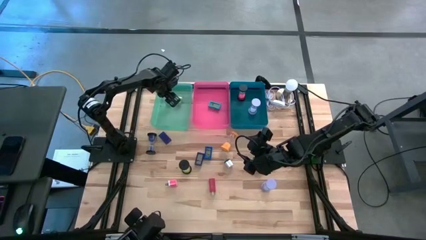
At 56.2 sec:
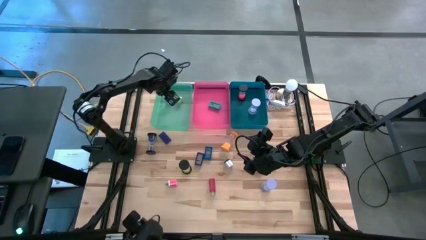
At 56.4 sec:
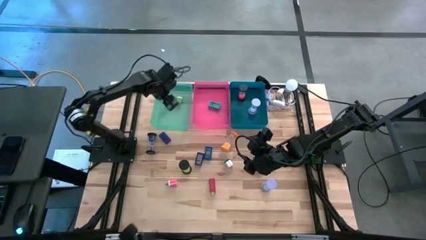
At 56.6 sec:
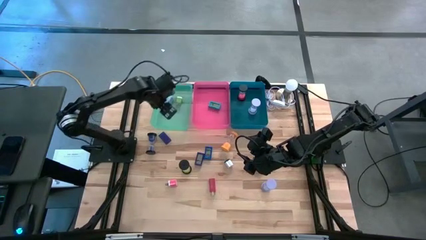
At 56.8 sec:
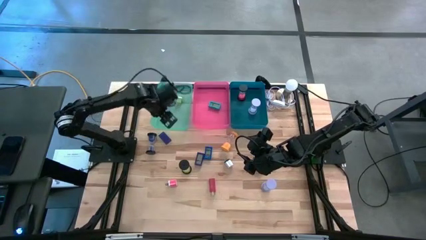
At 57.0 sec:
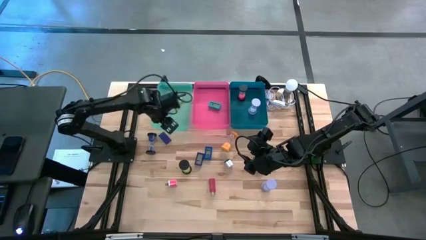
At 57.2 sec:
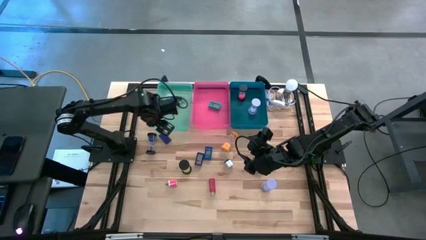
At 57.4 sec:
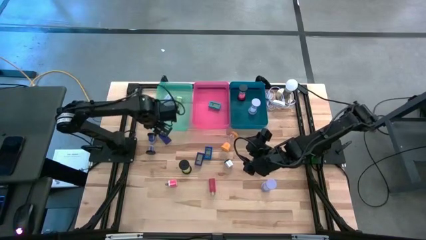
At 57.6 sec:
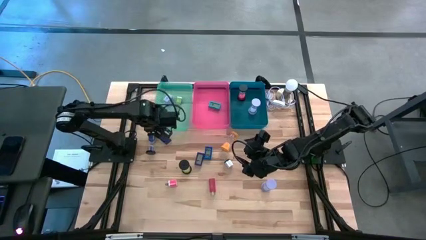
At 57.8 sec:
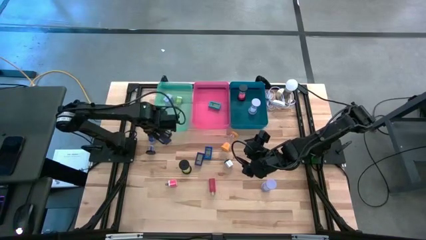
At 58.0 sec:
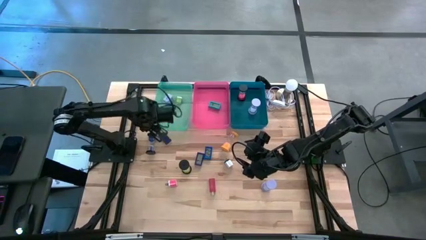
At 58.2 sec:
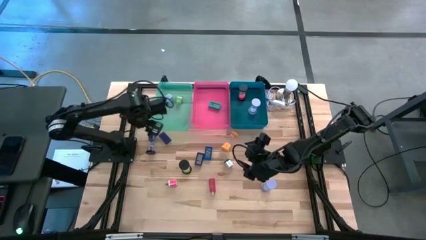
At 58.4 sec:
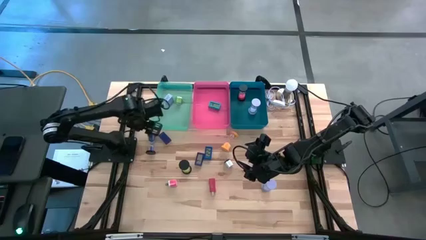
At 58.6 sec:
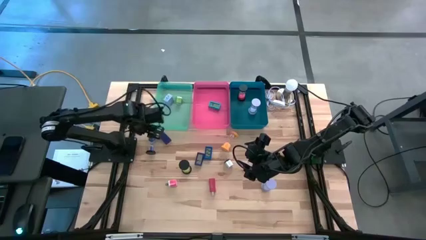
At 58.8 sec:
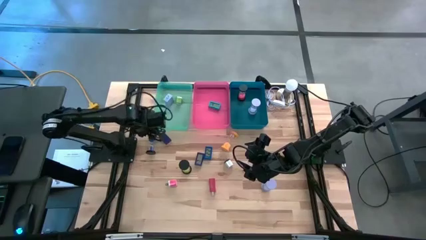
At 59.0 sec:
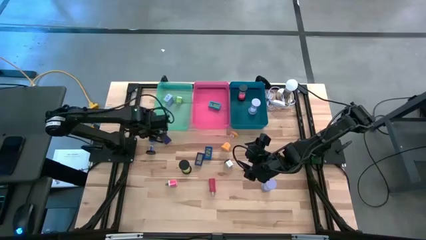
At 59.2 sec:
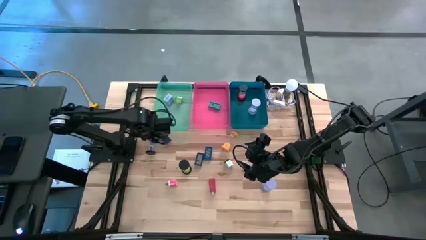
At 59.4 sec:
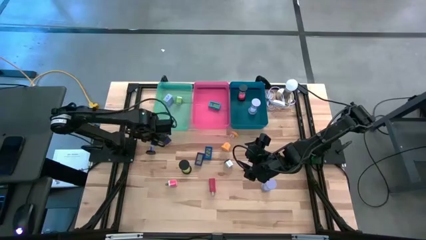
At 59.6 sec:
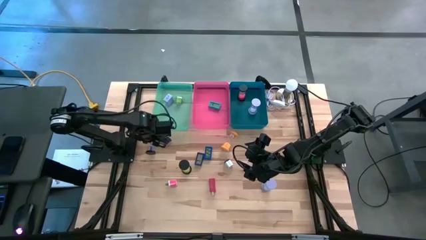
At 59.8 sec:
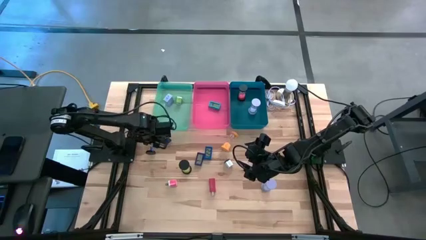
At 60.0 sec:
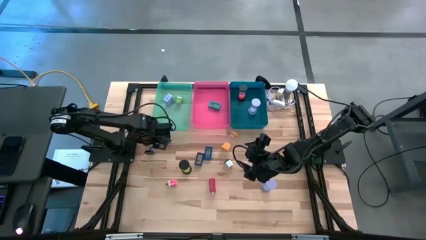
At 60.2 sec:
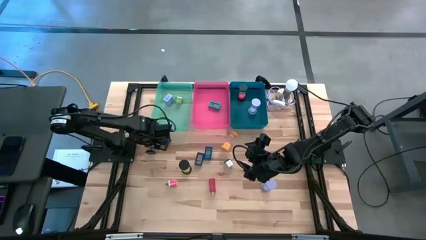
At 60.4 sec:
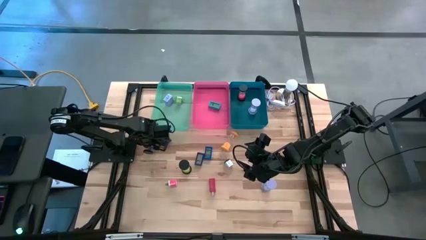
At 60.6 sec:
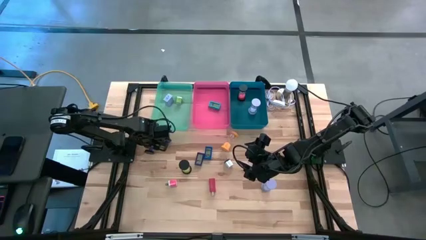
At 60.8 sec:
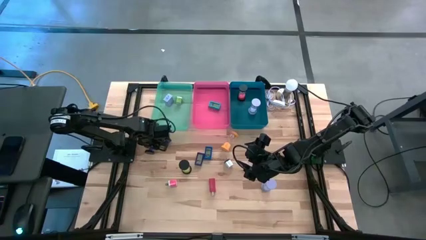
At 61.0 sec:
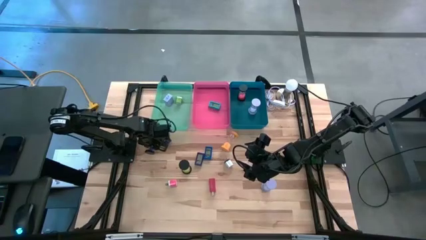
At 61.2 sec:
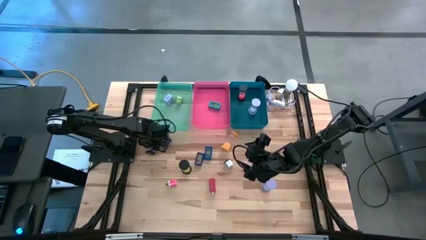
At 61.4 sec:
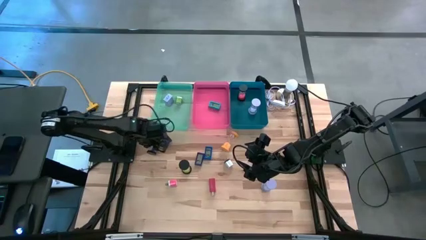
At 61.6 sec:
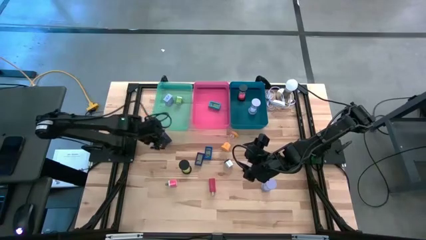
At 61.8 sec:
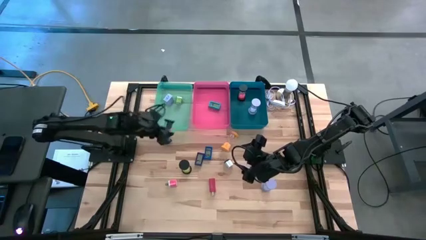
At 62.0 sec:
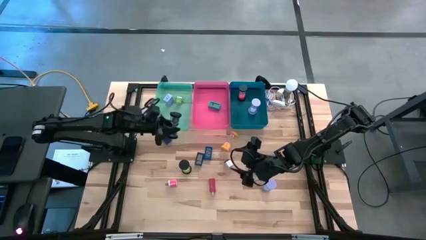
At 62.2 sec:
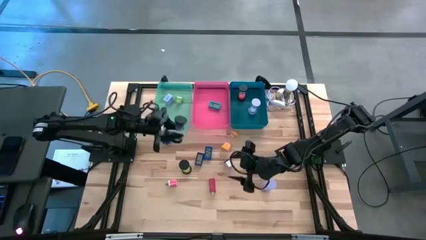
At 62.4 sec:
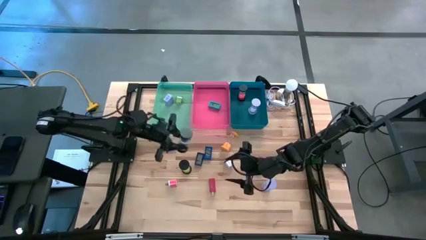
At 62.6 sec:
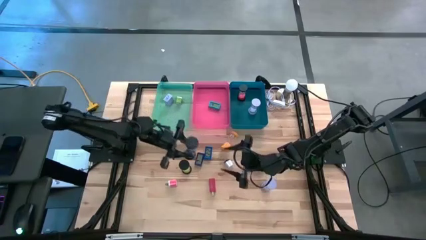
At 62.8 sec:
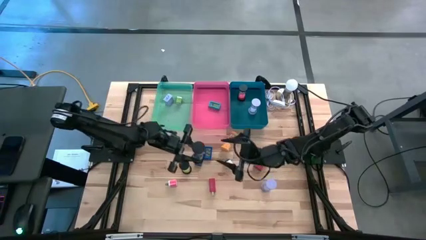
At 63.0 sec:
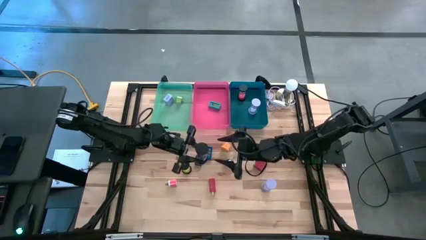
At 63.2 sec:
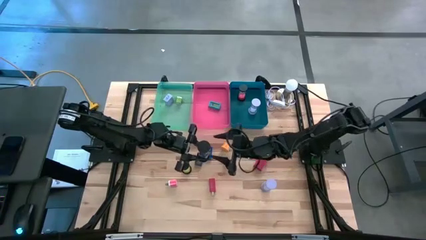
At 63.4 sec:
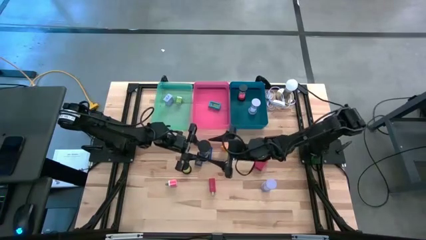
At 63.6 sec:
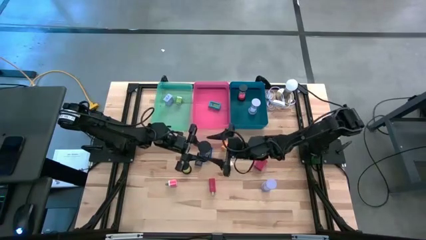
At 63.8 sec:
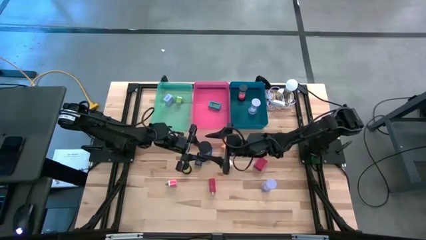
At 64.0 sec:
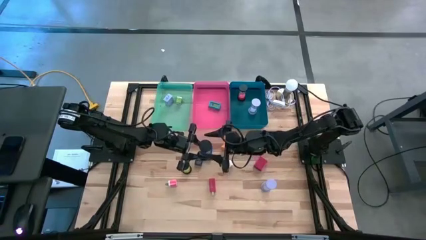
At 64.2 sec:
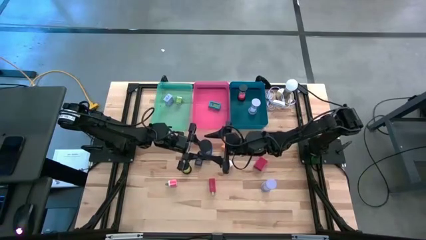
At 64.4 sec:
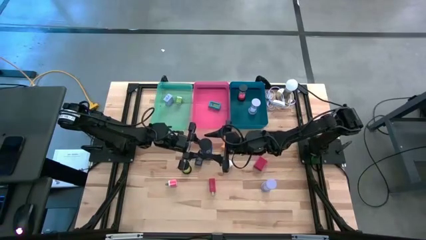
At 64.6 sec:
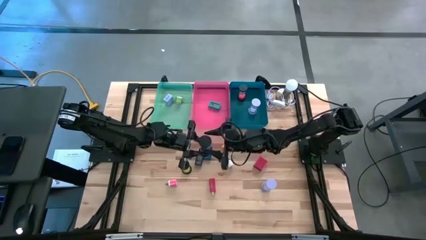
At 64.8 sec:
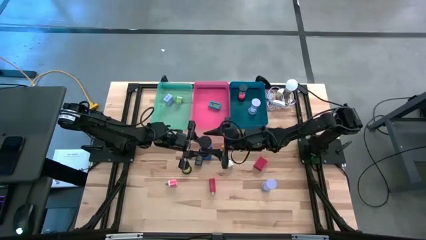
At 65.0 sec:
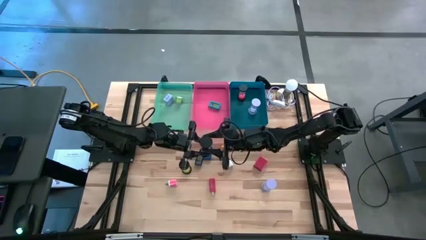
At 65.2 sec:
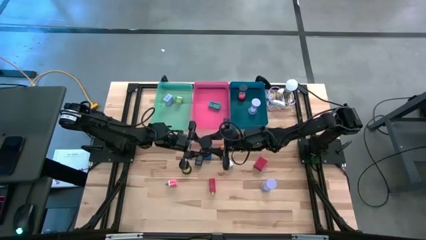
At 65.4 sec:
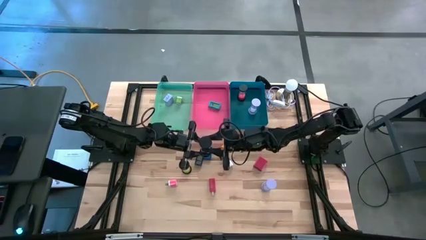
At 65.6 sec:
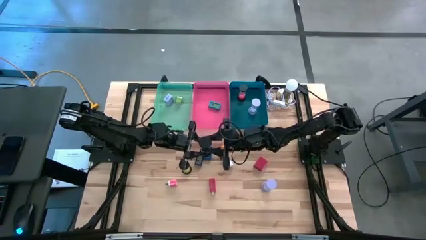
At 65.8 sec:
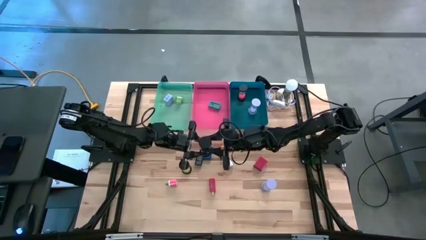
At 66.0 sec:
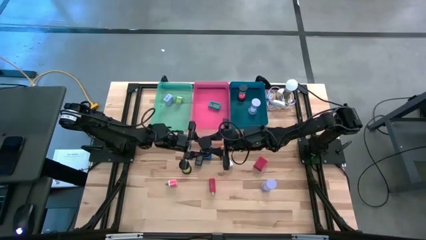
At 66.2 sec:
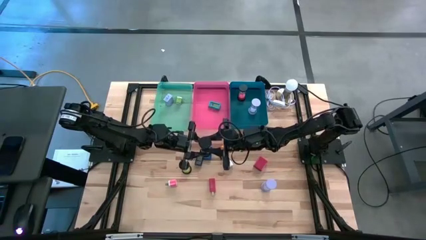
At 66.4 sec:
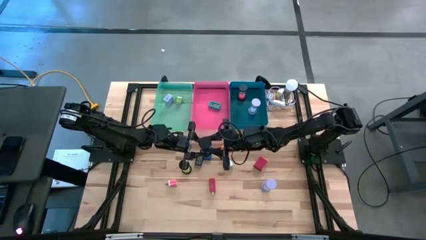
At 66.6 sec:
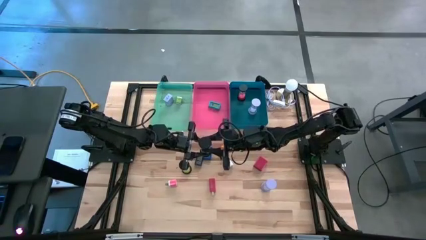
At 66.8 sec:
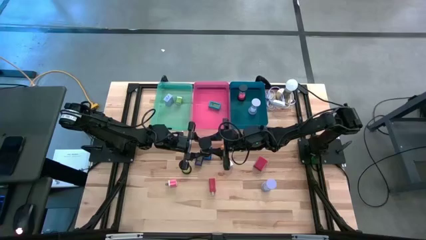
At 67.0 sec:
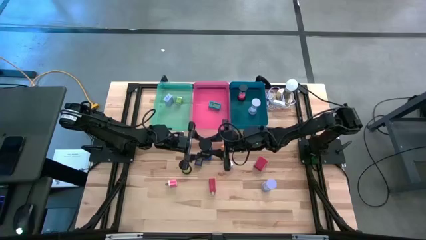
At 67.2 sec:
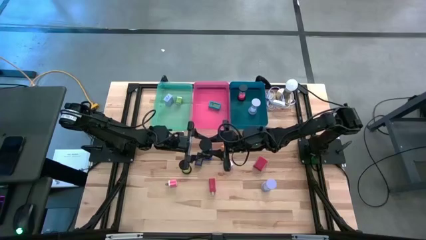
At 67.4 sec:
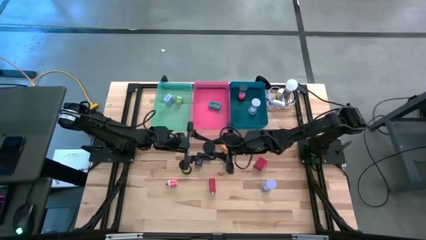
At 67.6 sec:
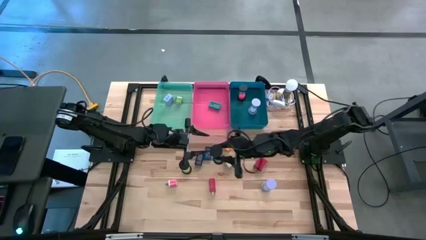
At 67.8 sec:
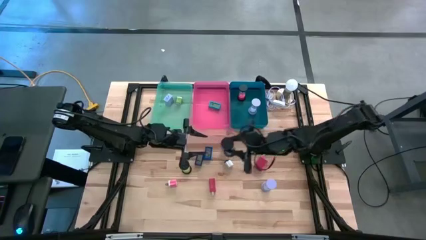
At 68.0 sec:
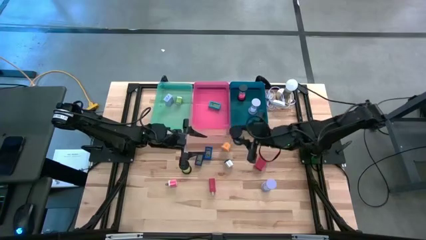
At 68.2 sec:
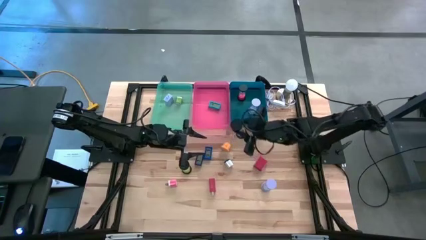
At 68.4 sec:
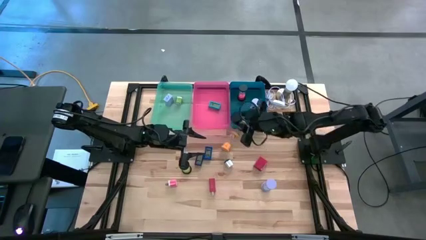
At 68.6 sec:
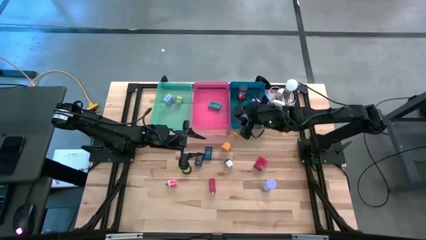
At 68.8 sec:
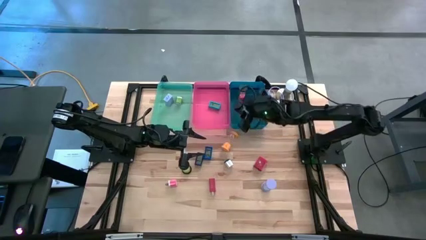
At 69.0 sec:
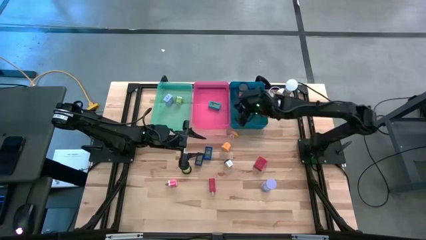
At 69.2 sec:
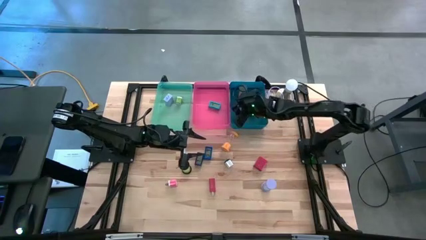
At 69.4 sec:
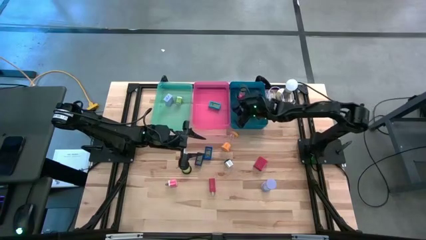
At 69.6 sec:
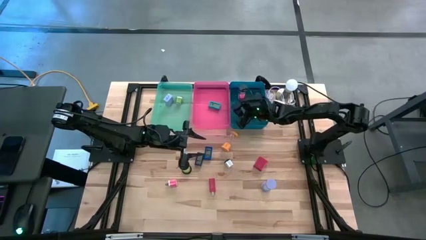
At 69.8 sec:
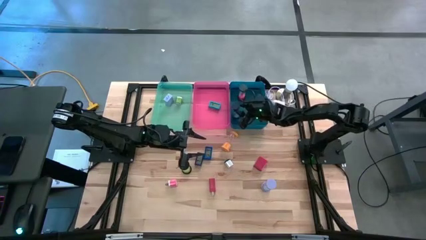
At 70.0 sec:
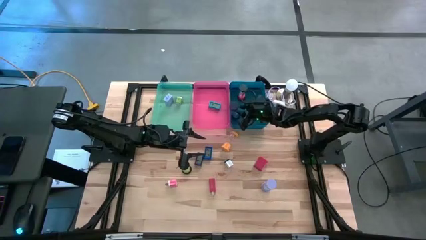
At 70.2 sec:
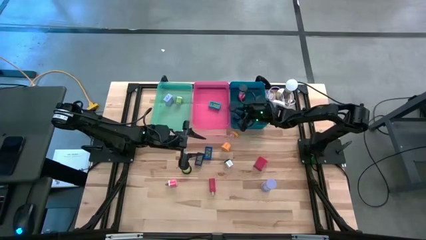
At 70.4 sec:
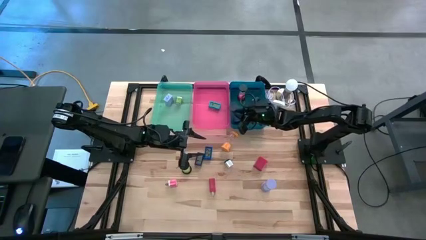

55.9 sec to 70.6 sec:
Task: Pick & Place Office items
Put the blue hourglass into the blue bin

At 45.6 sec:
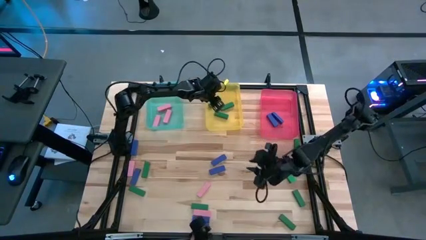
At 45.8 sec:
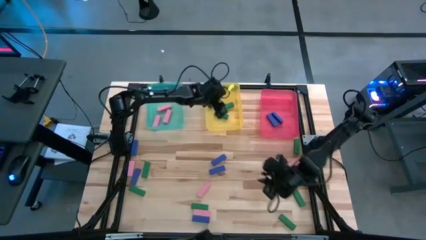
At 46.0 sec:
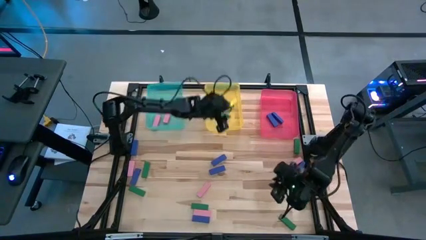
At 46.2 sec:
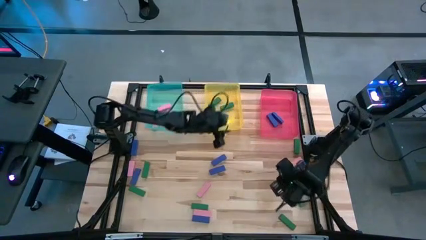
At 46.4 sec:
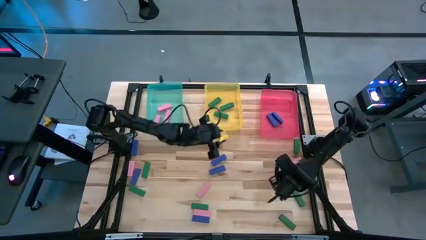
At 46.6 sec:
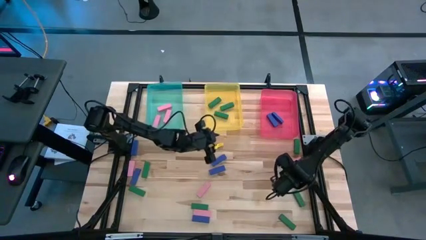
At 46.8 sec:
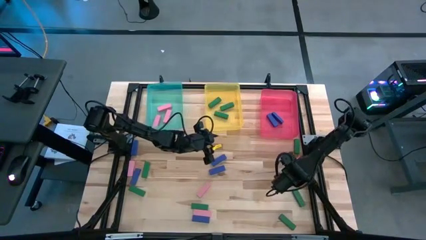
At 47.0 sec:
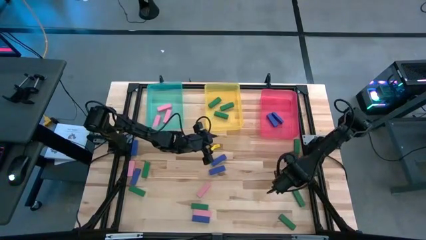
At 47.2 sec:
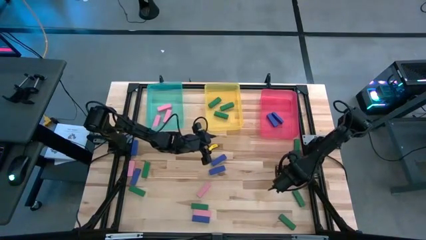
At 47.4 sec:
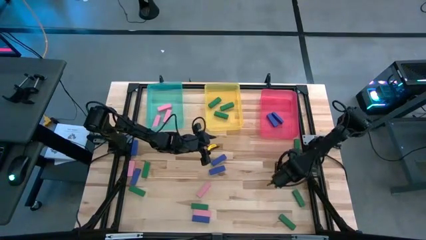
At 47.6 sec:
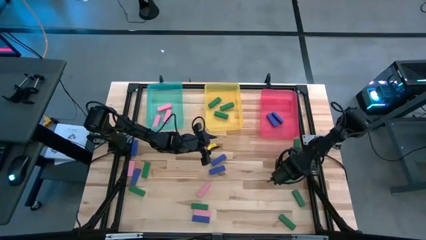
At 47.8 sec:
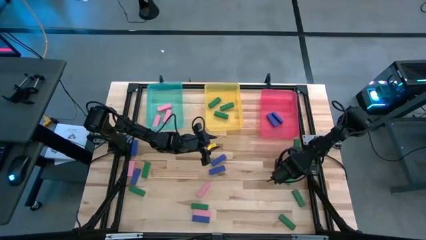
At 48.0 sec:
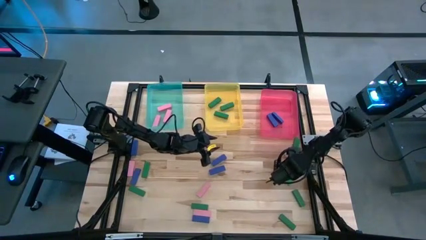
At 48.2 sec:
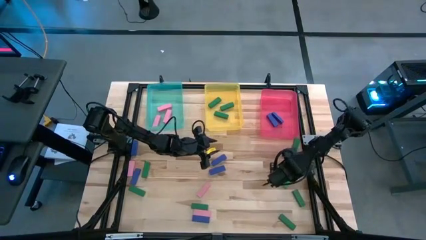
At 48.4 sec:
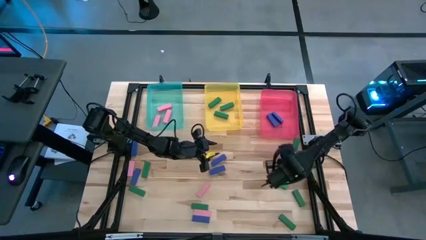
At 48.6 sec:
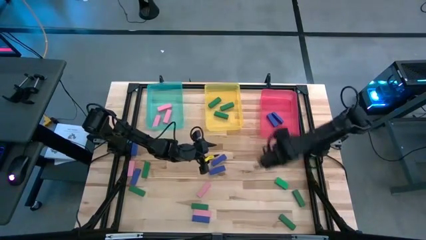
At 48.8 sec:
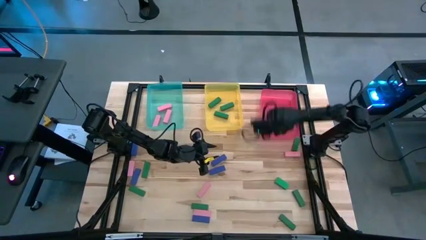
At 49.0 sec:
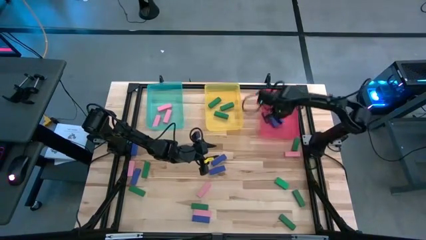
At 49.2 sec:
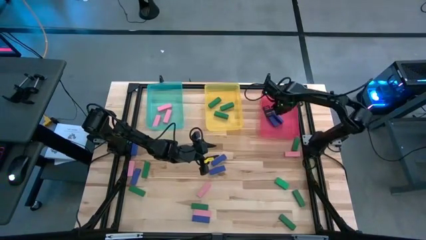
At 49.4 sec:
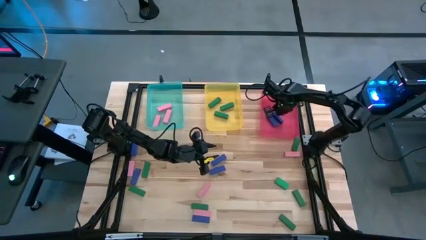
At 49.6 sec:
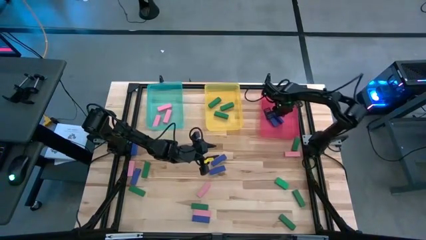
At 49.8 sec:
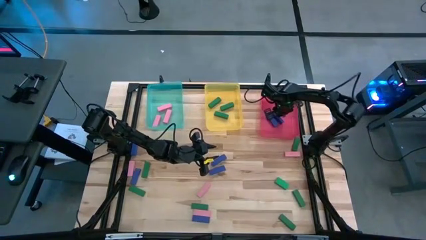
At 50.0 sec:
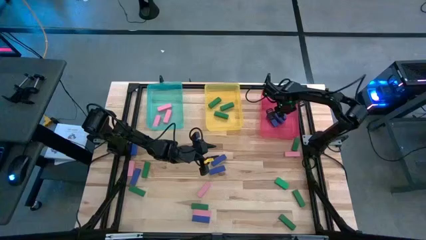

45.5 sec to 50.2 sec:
Task: Sort blocks
Put the blue wooden block into the red bin
